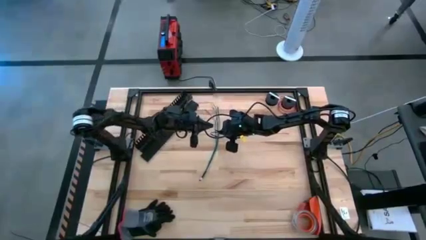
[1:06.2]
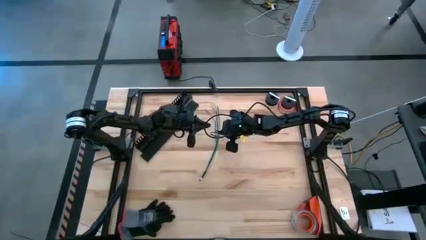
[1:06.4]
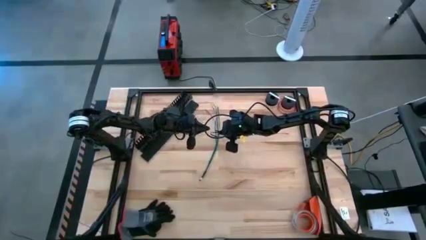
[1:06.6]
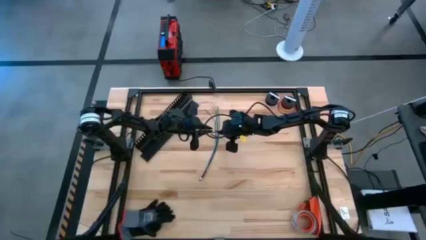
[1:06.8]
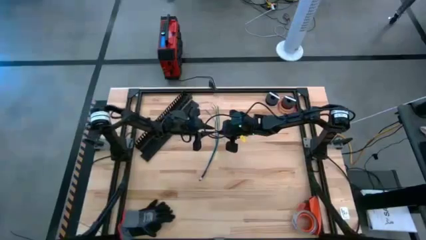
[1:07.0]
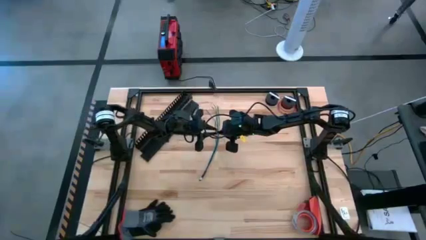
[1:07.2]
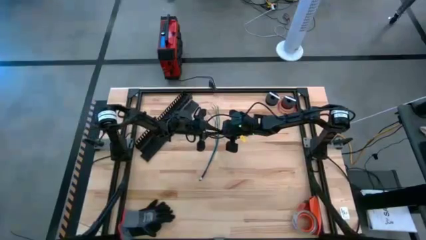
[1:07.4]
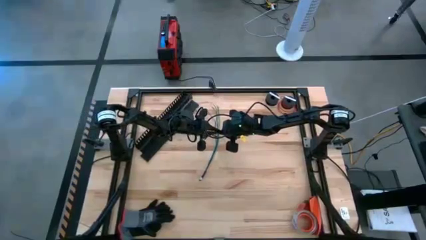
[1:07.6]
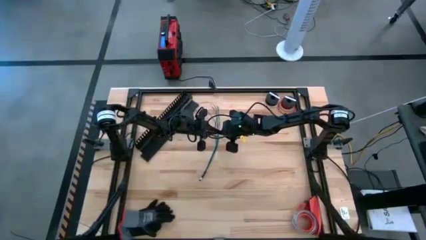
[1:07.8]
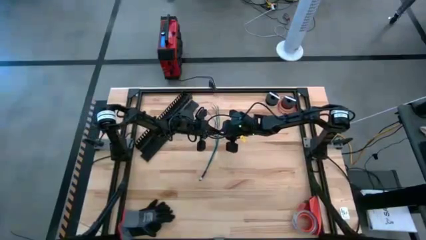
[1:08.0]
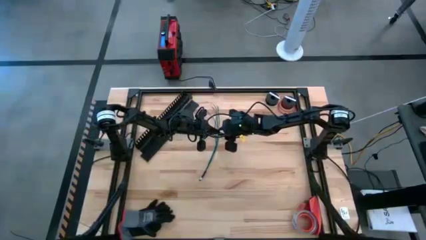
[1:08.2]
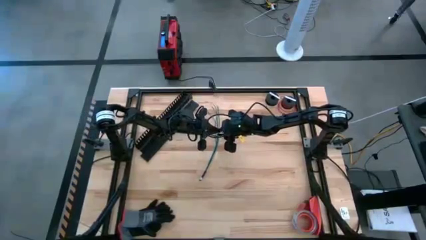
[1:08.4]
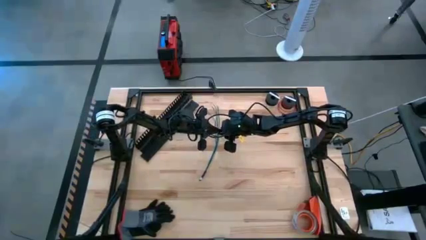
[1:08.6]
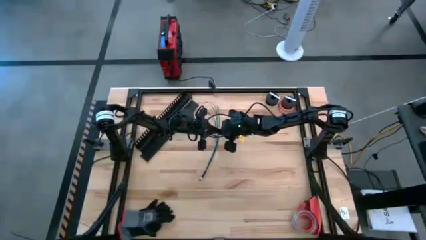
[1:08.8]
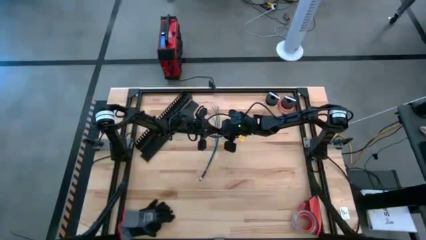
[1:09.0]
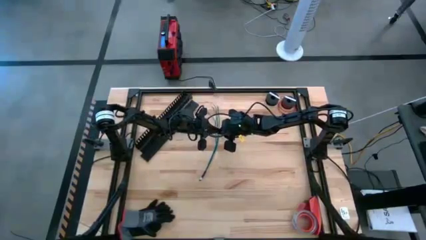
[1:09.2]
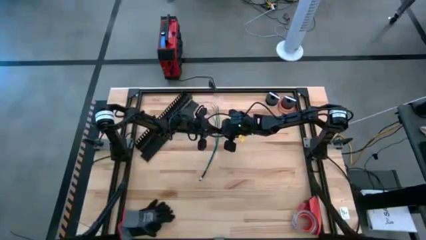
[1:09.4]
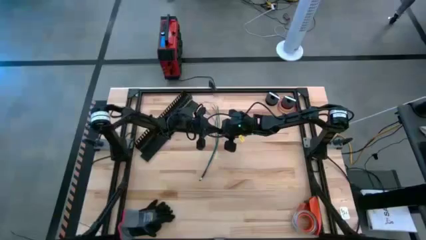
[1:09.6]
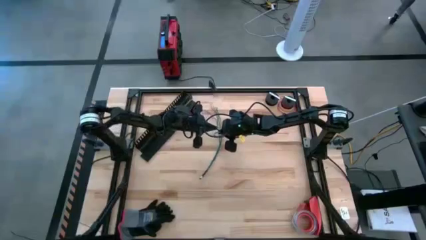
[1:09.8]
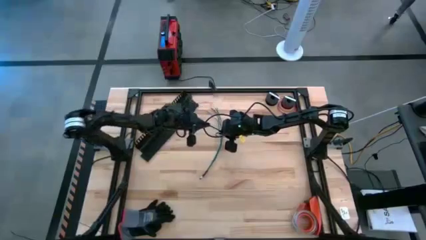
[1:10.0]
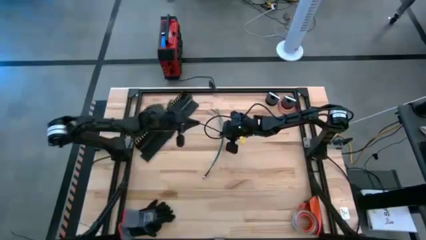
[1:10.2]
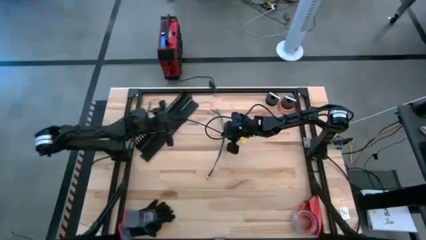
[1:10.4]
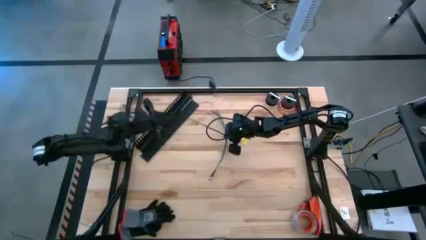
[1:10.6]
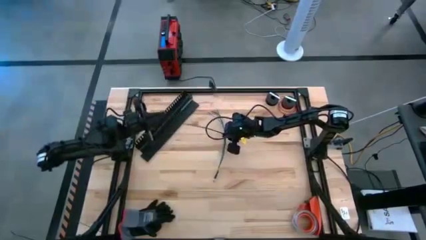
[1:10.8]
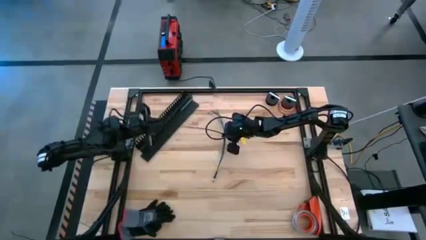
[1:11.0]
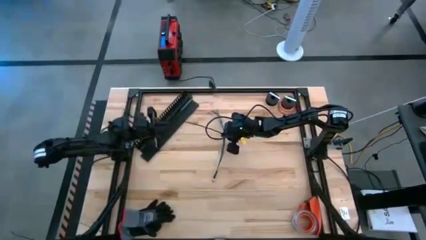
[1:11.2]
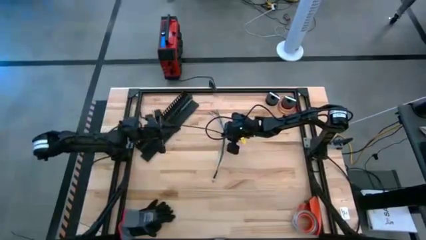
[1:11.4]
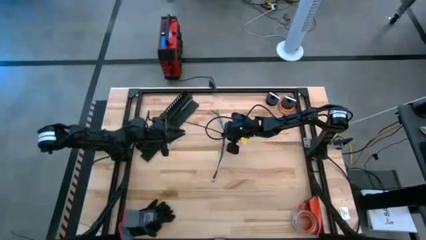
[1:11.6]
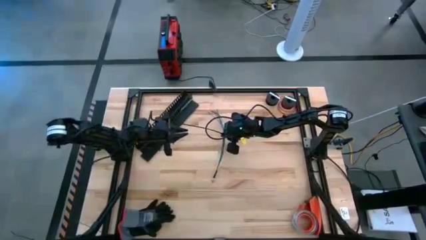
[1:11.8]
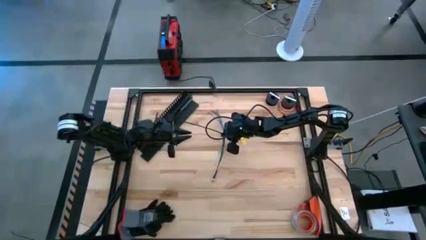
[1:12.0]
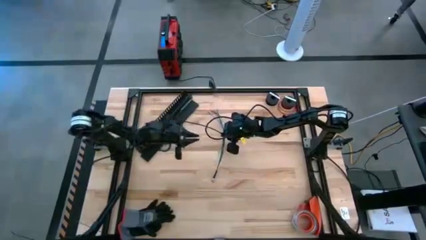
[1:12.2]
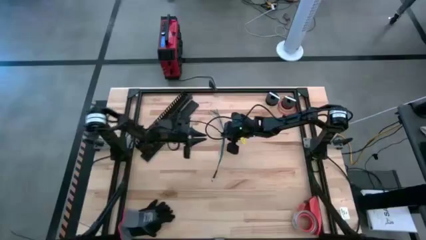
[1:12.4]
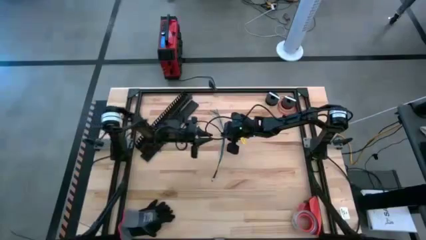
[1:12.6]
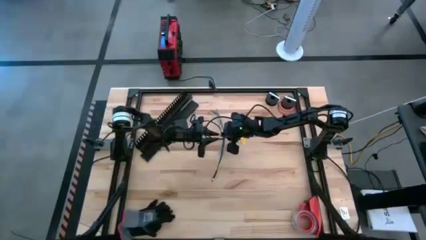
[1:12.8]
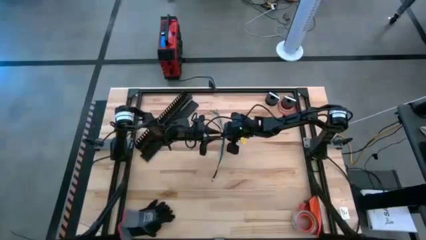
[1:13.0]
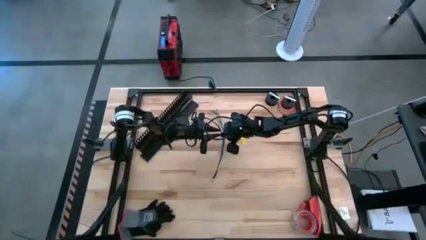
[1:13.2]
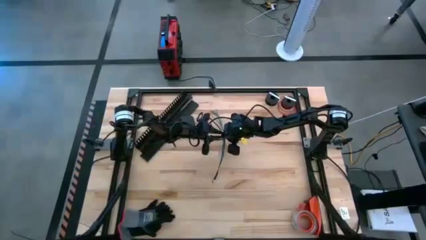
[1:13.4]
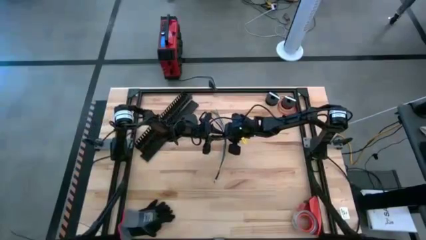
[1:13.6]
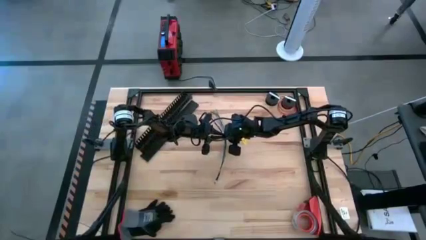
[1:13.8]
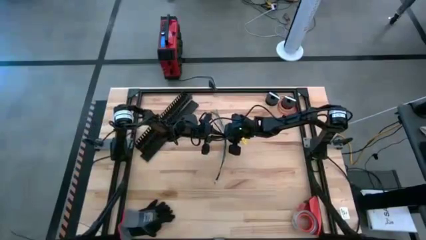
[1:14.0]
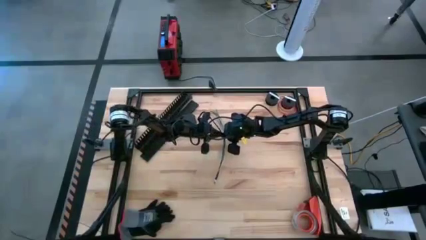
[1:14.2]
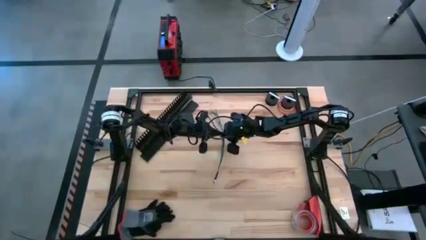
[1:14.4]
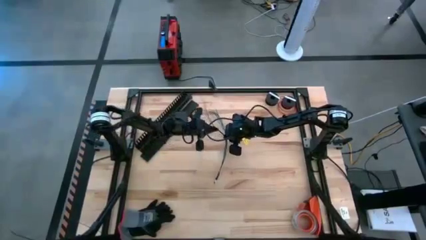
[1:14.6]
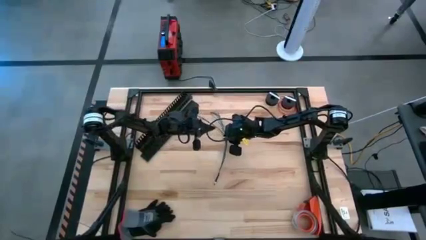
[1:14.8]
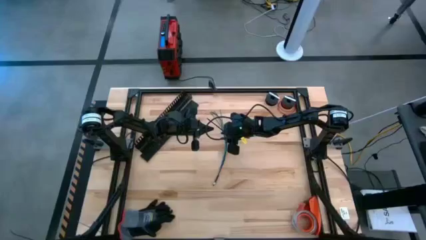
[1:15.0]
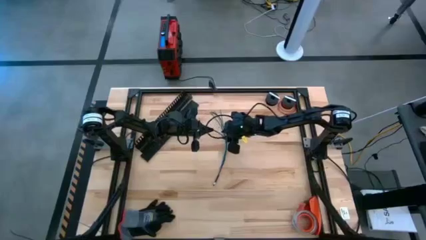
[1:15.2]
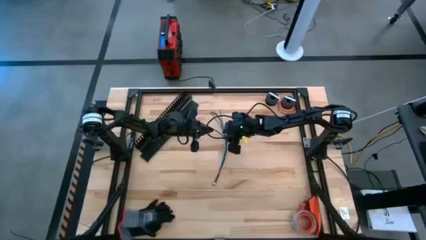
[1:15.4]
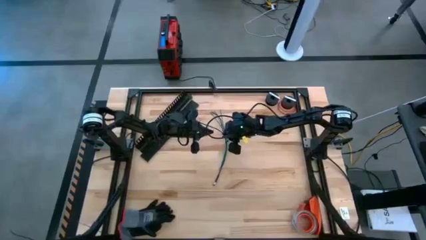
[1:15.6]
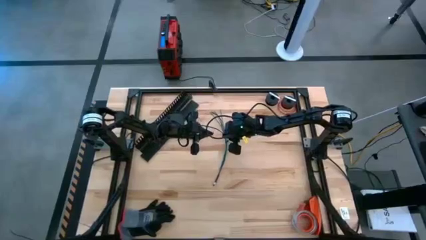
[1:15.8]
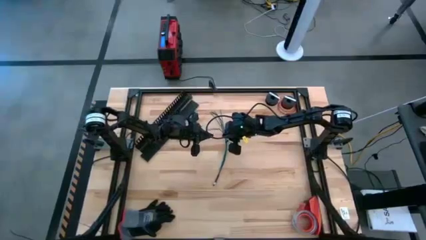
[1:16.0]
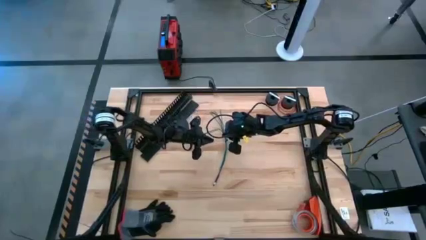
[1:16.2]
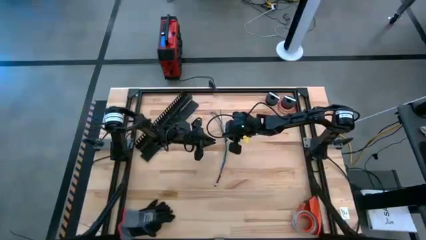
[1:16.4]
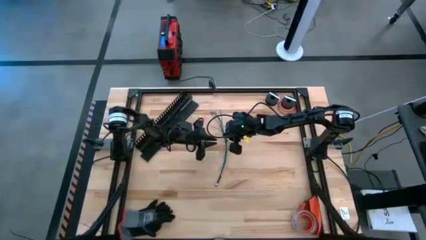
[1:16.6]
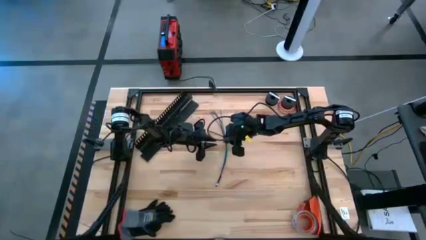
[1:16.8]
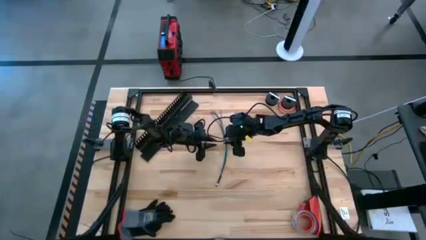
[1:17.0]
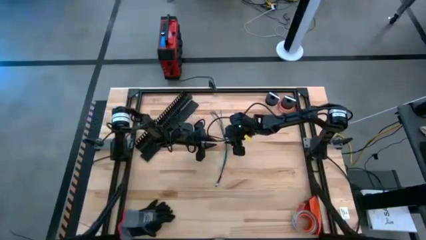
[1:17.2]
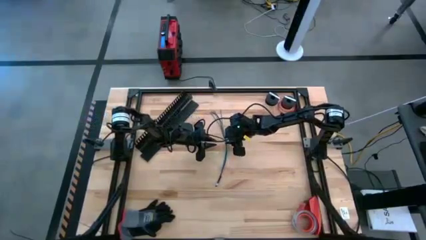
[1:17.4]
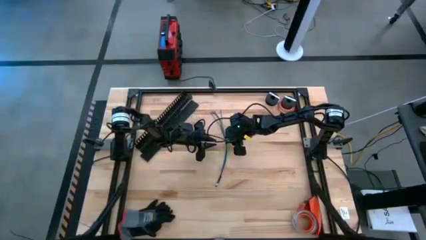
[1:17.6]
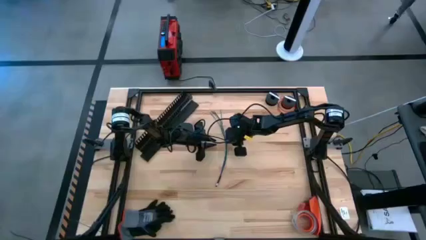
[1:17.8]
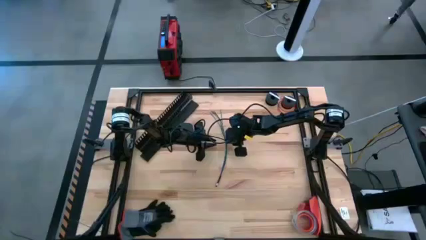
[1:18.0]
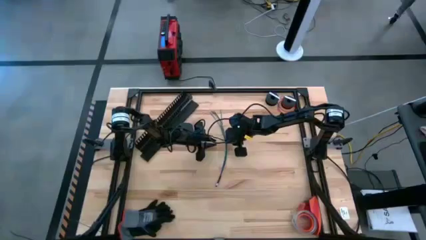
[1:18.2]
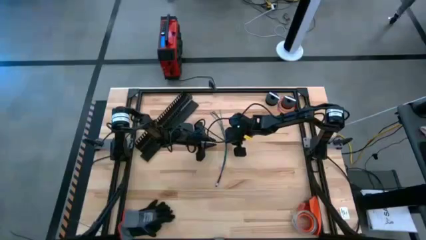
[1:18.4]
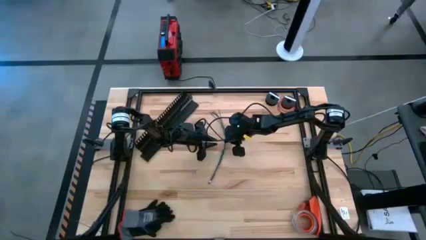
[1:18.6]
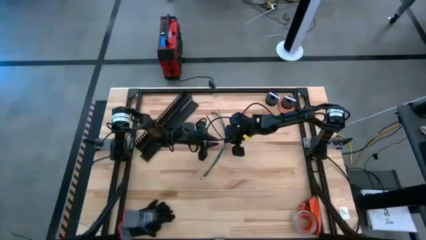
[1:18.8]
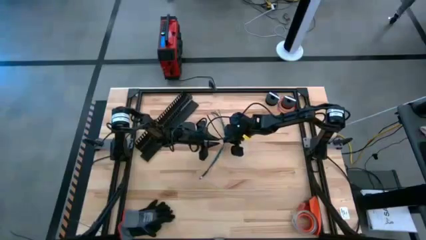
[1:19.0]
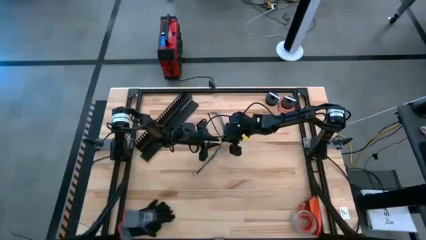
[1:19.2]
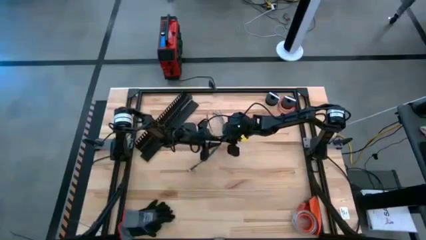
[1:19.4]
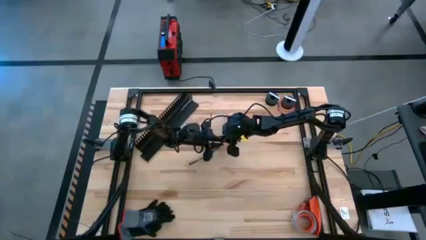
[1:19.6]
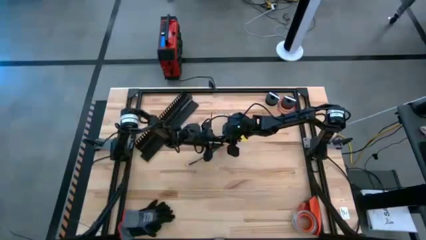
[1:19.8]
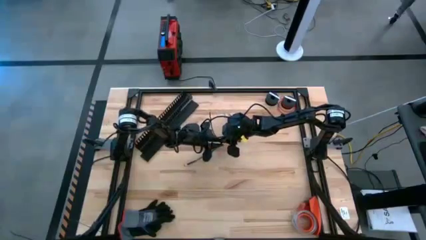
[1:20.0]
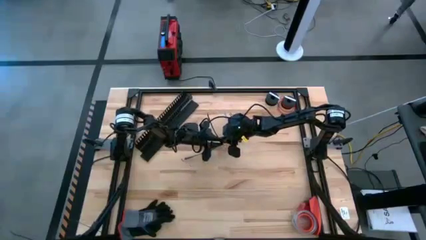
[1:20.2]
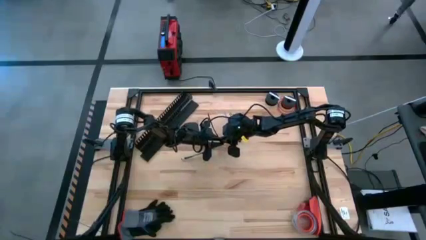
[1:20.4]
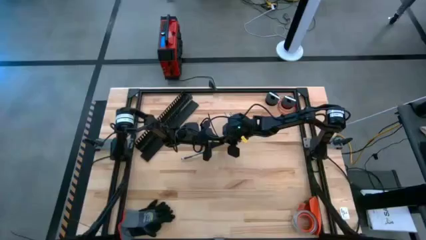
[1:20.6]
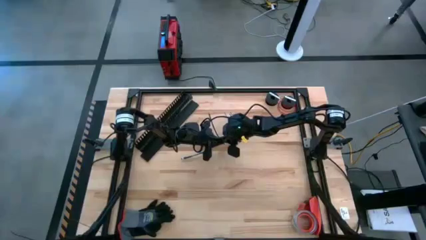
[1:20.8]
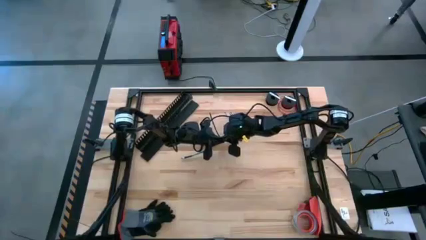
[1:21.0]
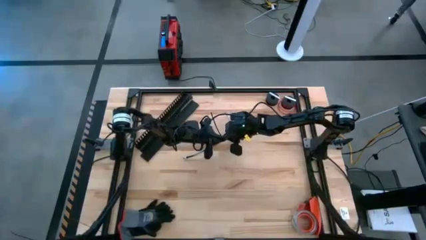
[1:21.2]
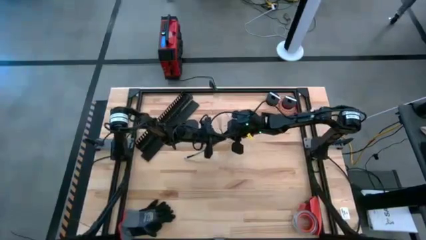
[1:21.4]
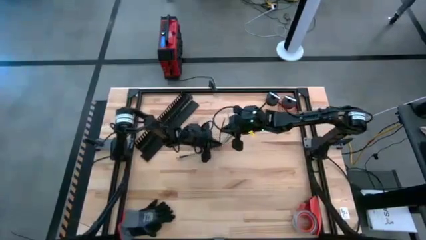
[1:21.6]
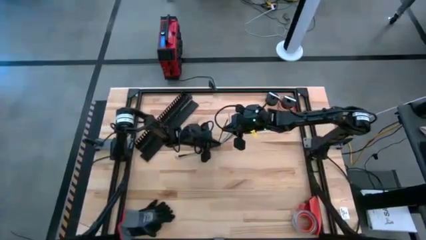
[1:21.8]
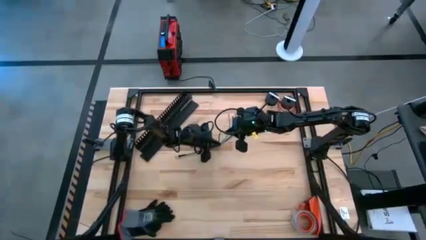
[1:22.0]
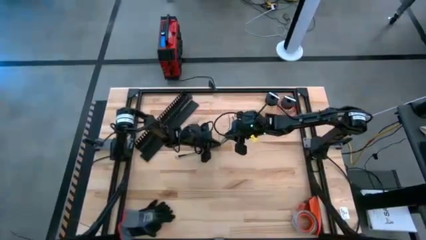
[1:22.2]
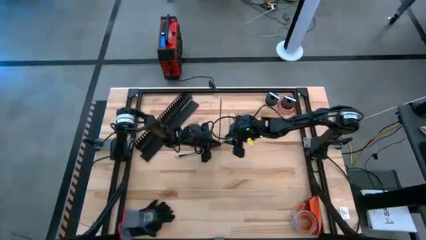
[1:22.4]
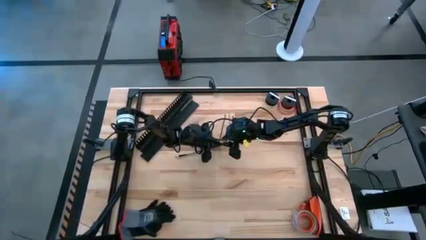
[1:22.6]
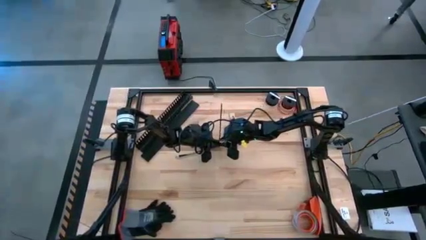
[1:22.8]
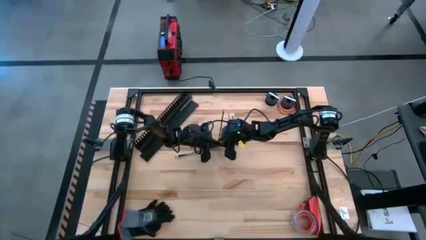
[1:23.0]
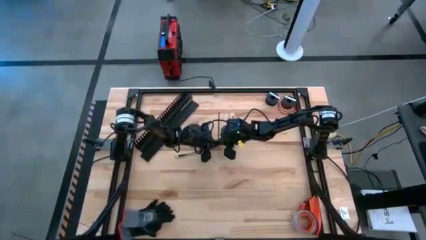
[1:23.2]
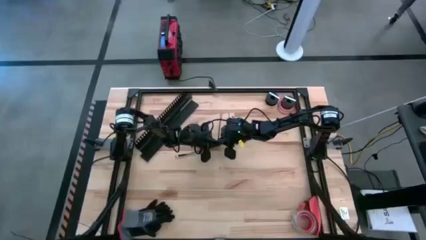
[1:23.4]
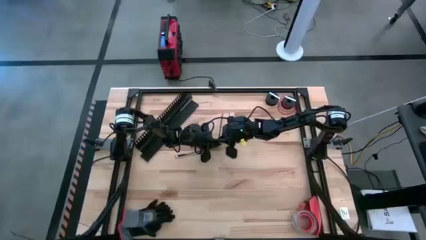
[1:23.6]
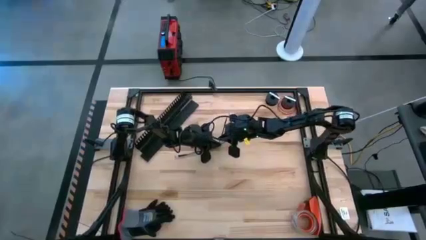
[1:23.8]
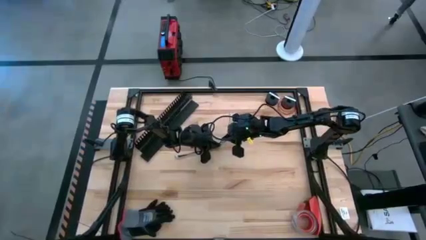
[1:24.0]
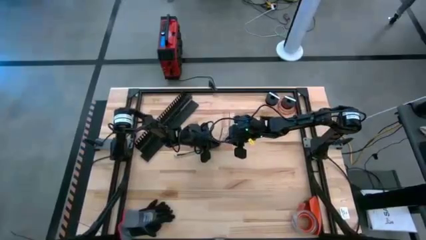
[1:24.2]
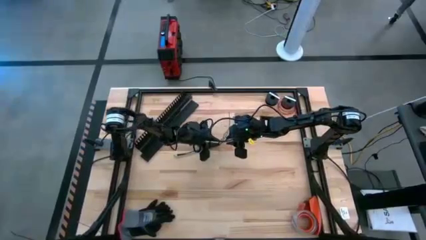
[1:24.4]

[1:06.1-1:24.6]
Task: Ziptie cables
Wrap the cable wires together using a black zip tie
